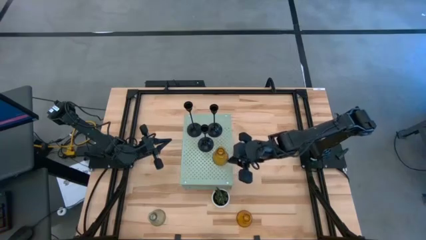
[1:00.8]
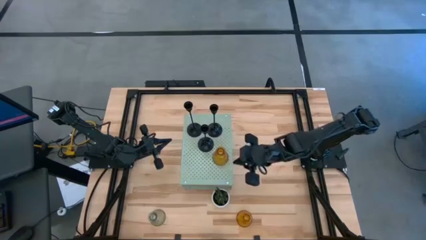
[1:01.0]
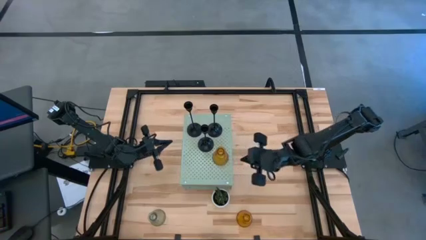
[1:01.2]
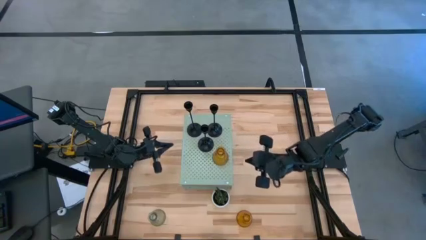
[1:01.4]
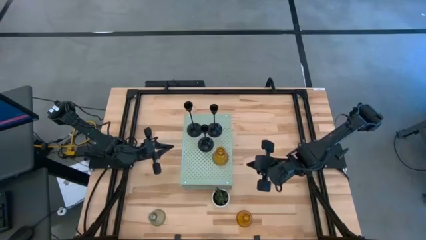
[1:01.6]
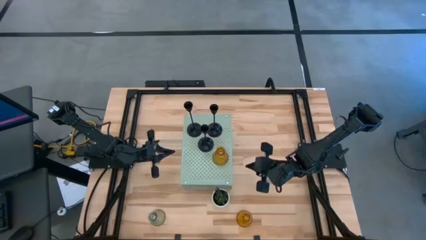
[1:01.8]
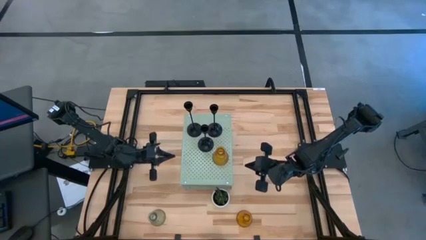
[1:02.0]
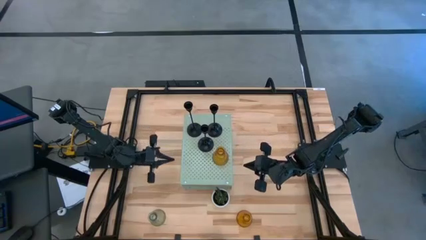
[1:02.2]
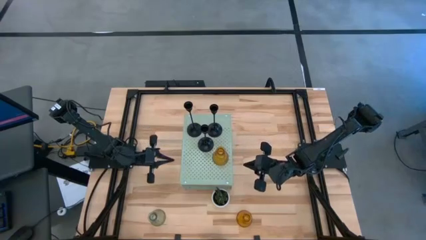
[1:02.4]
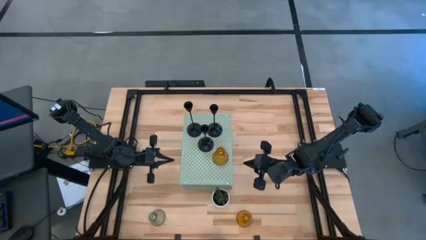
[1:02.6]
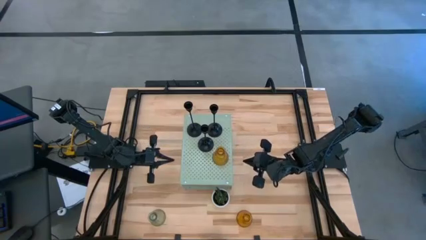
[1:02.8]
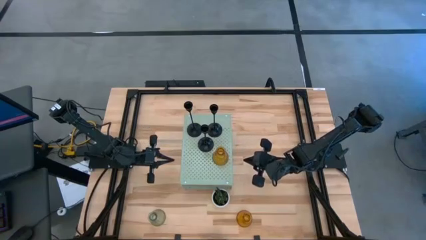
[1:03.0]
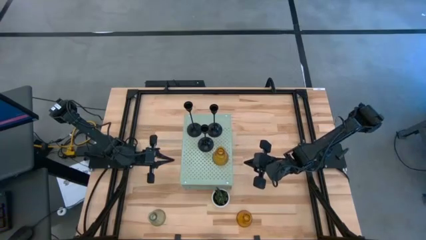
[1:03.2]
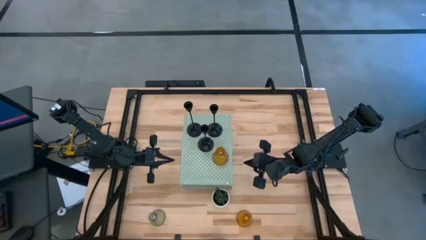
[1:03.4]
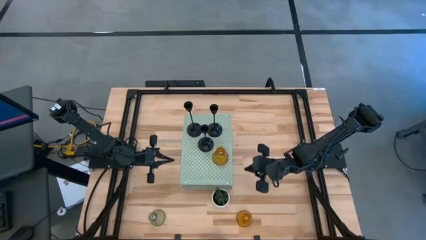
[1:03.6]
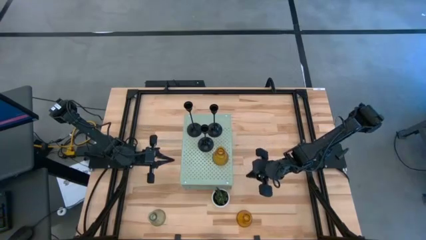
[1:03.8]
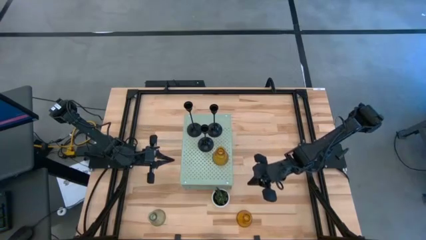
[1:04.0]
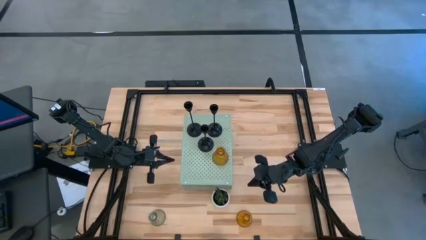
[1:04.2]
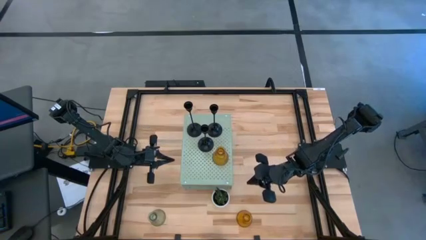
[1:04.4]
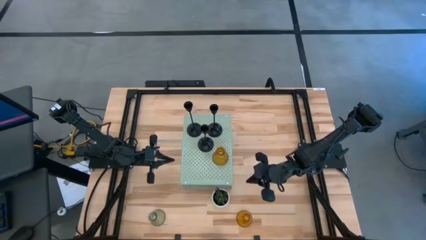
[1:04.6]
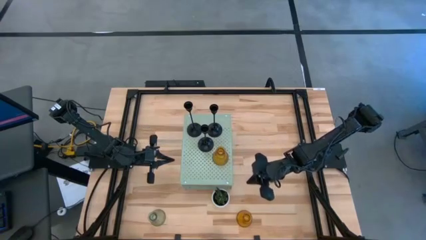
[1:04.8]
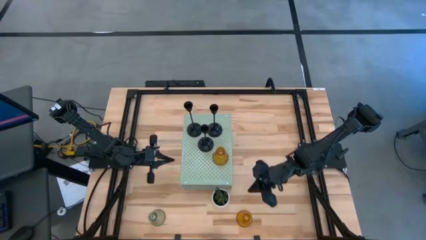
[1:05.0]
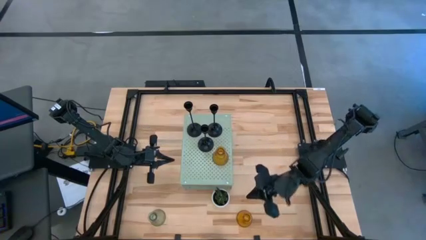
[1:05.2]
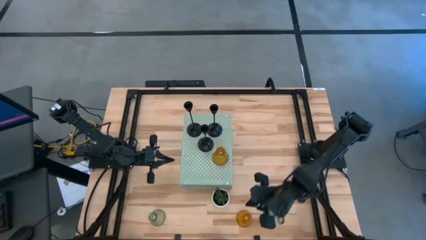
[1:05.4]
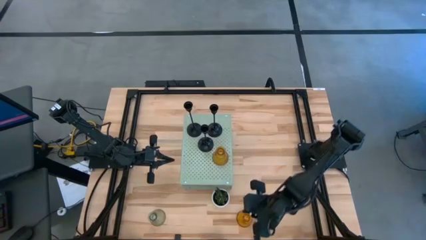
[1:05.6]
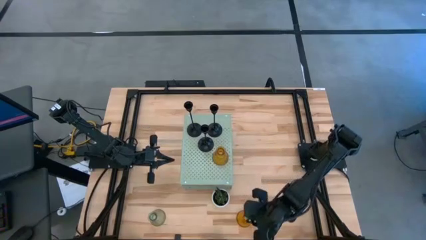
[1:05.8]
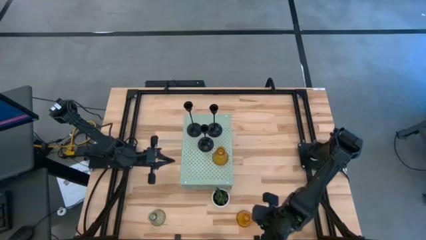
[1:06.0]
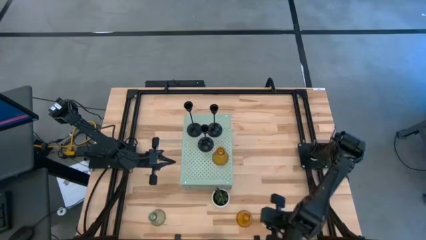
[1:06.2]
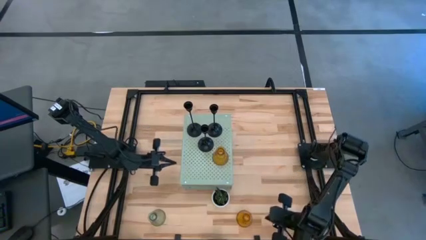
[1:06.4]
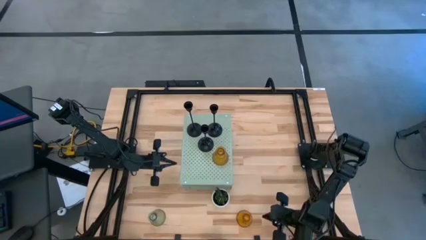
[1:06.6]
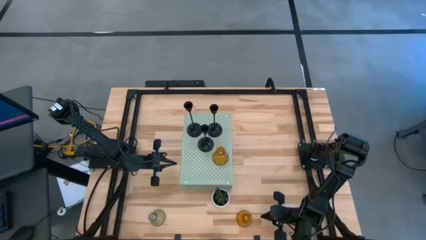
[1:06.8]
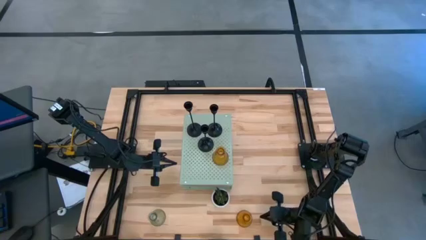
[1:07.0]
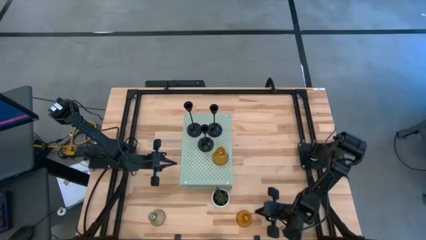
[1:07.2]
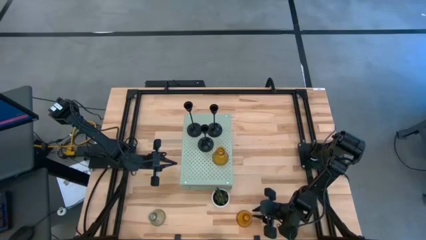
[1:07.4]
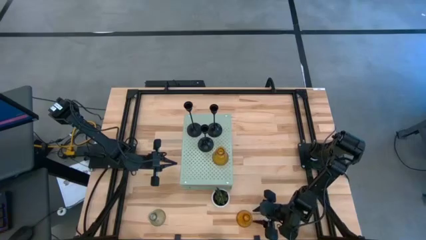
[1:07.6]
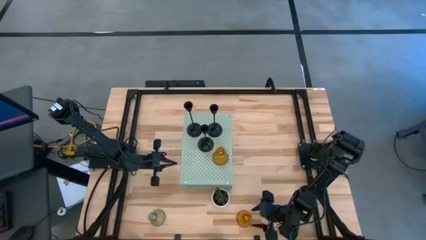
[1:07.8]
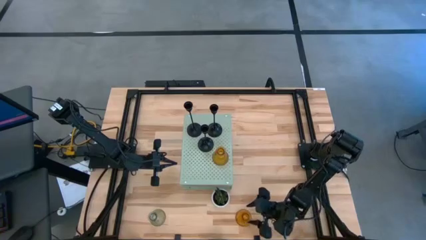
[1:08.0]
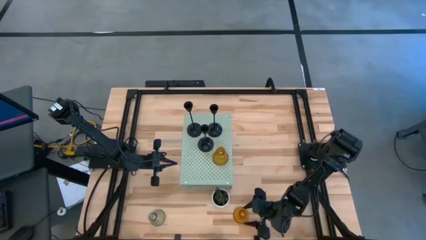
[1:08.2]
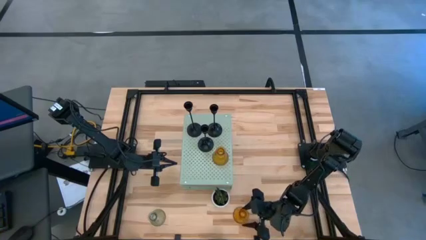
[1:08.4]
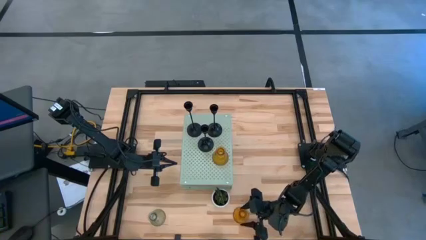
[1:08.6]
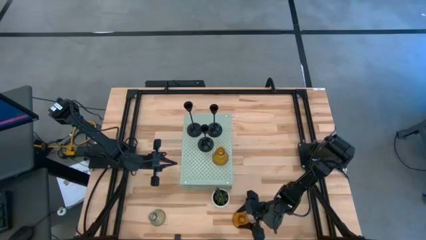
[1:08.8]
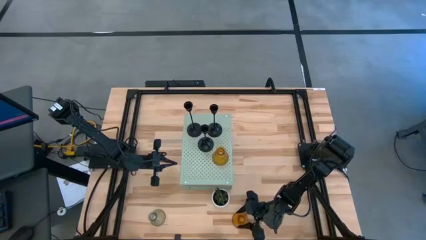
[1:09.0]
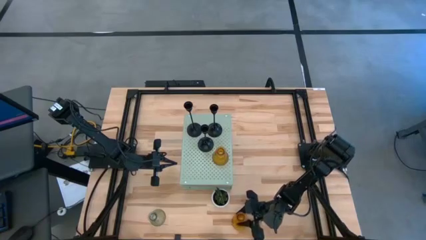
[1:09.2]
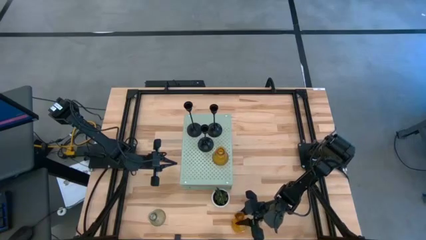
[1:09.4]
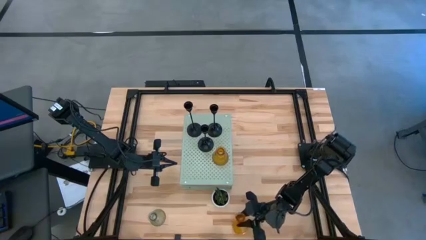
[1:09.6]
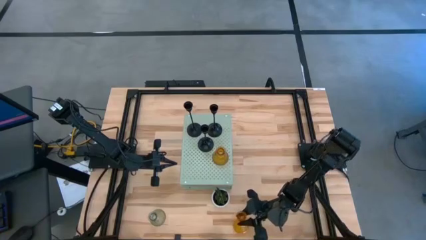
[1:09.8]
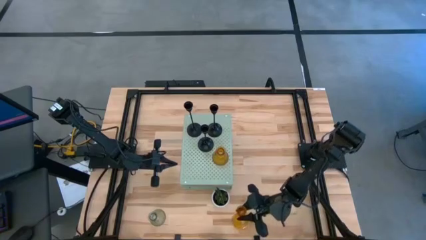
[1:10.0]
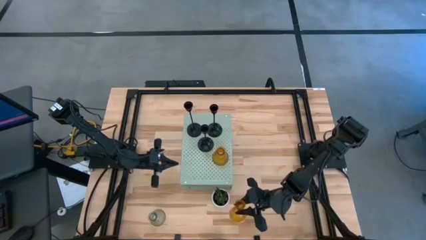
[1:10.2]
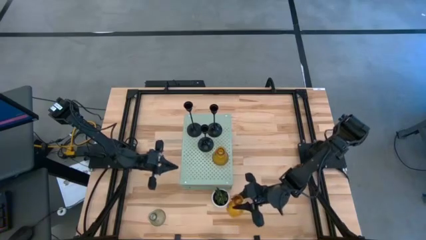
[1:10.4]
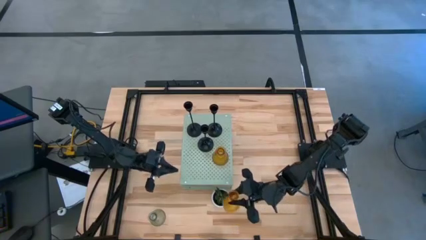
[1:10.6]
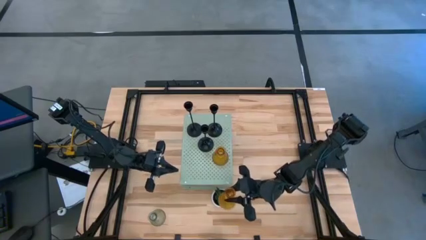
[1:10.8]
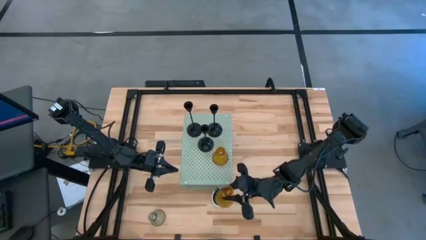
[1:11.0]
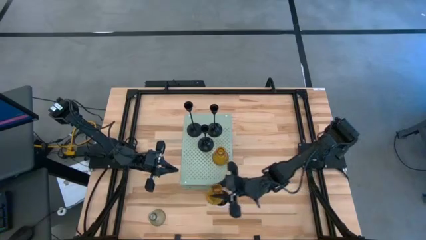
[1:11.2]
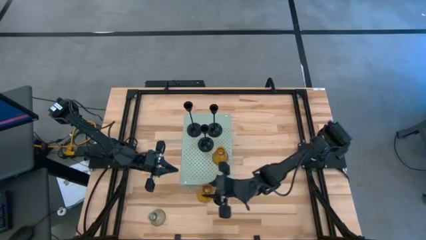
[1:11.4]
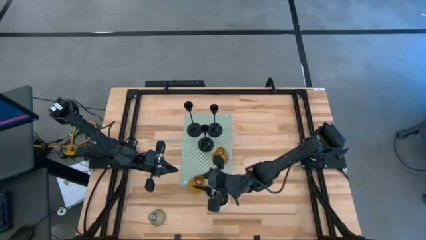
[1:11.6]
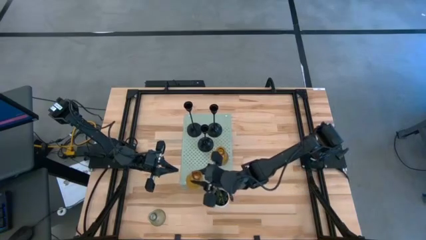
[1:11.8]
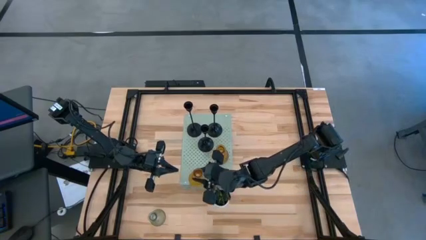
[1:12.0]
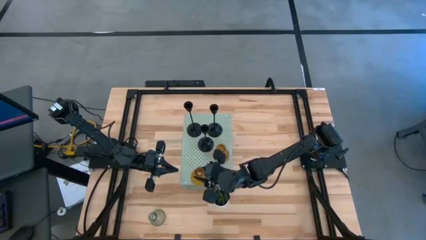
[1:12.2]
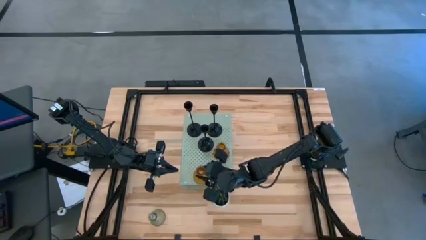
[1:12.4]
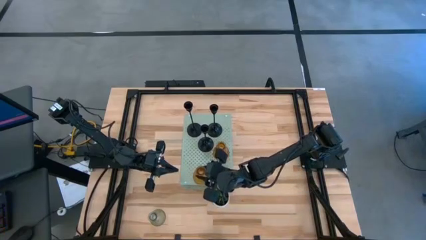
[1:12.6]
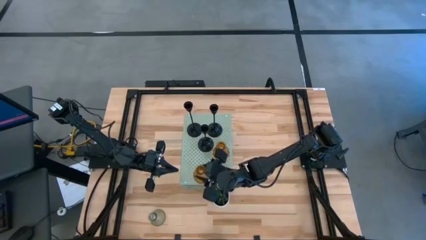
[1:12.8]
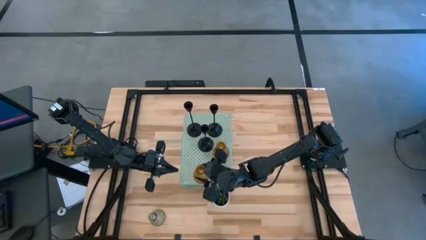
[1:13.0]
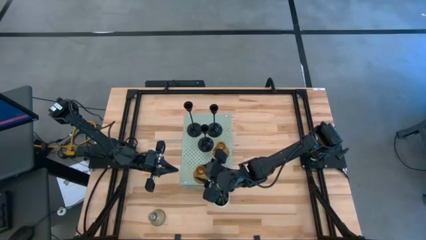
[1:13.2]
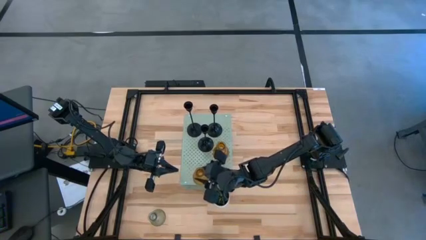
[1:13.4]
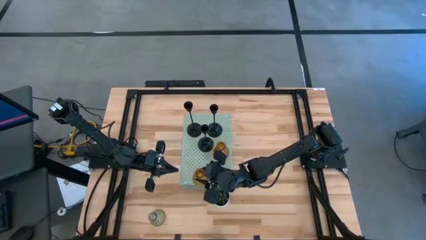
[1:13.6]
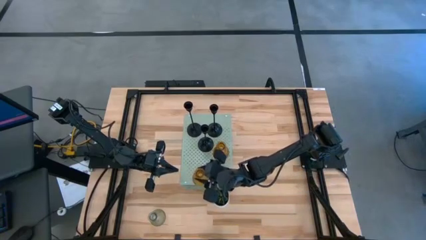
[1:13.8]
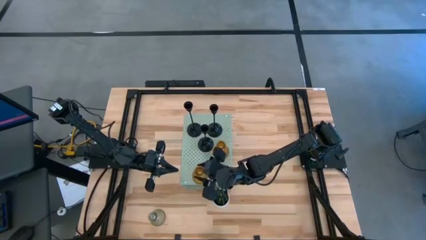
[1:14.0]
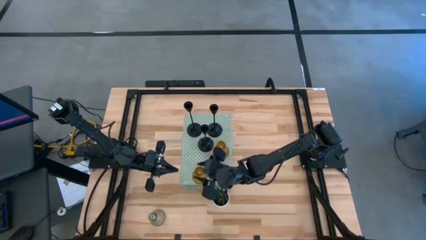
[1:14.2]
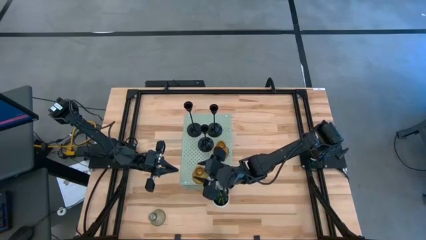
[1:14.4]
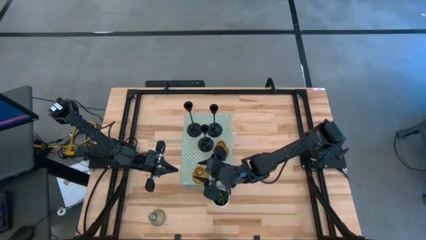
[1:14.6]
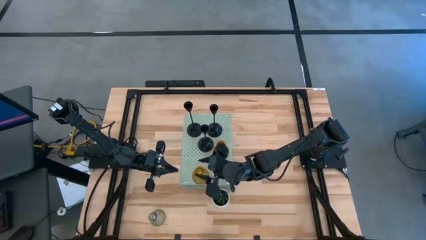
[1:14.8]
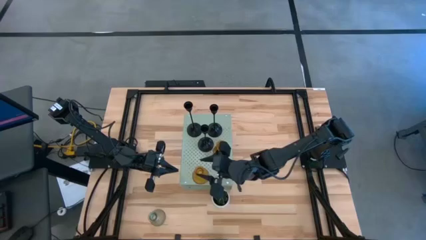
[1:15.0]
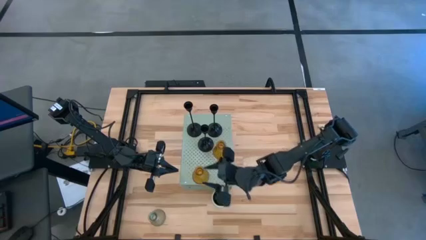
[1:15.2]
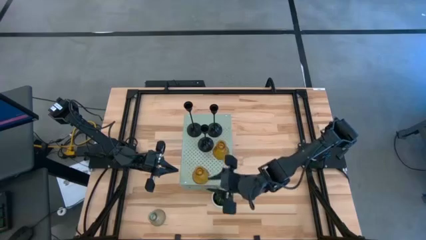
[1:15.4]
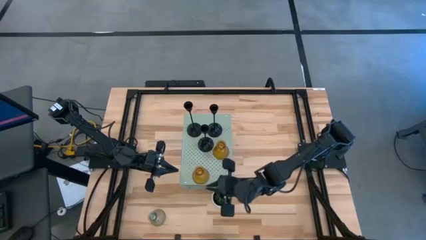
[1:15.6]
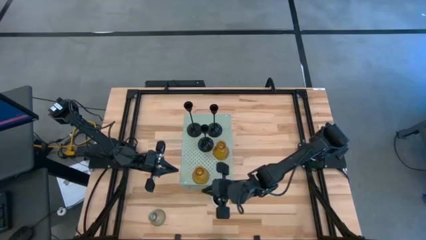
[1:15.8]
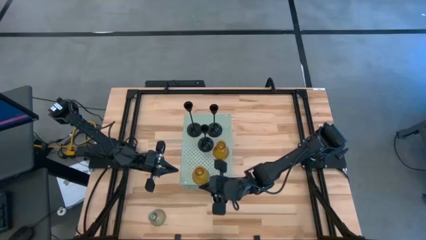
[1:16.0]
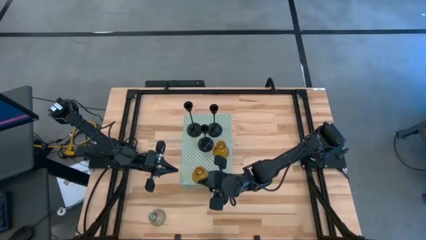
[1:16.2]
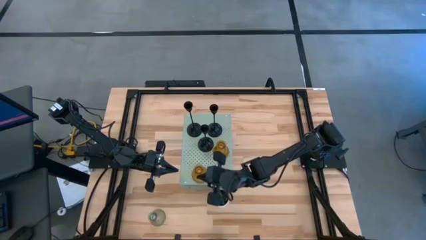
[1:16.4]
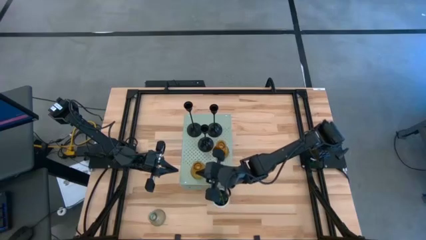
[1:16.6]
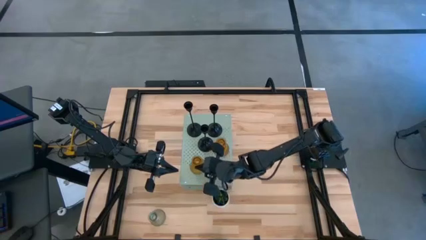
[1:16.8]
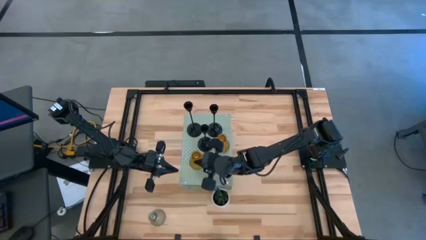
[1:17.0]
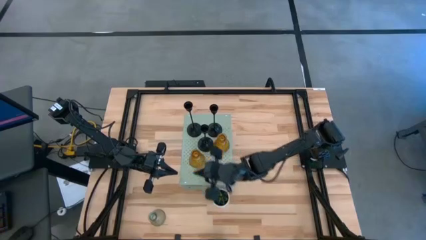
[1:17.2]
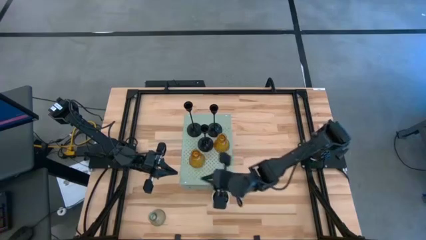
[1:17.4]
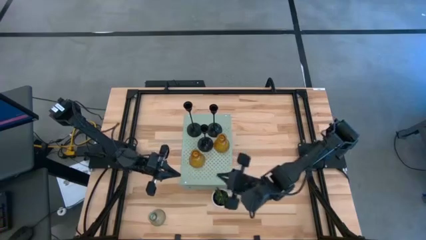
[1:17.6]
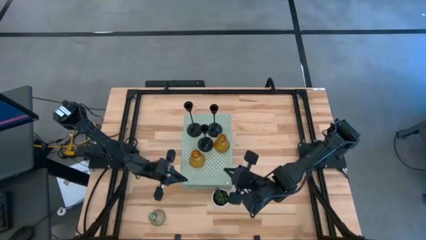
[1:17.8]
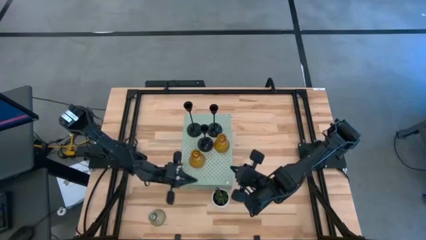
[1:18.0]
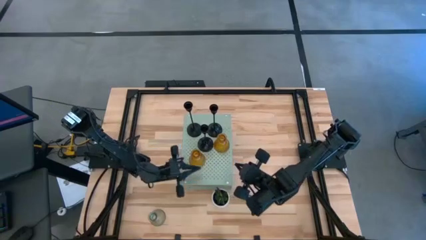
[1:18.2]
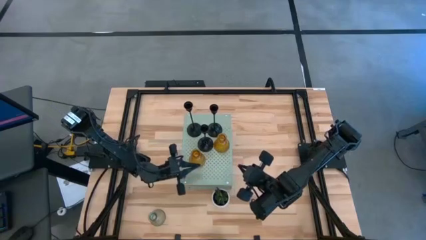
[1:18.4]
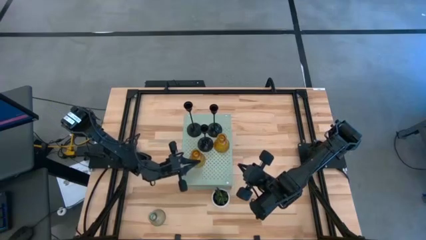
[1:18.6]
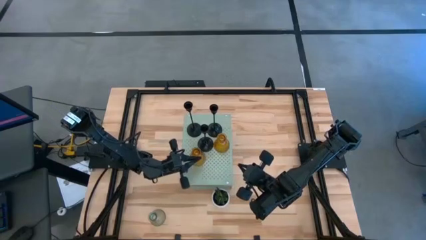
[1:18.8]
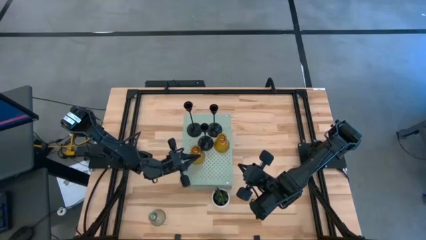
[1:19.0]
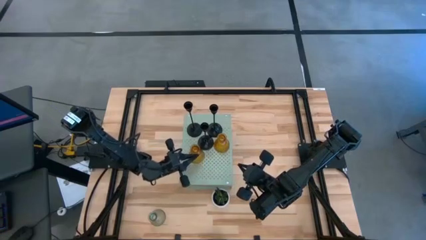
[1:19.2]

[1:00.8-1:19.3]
Task: Pick & Place candle stick holders
Put the bottom yellow candle holder on the shelf
